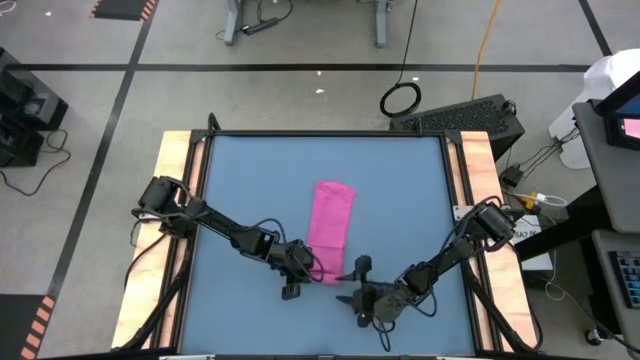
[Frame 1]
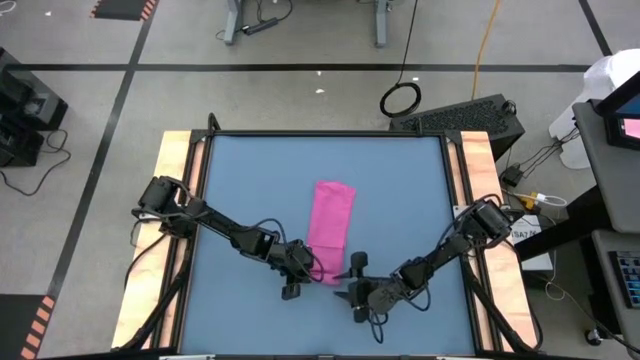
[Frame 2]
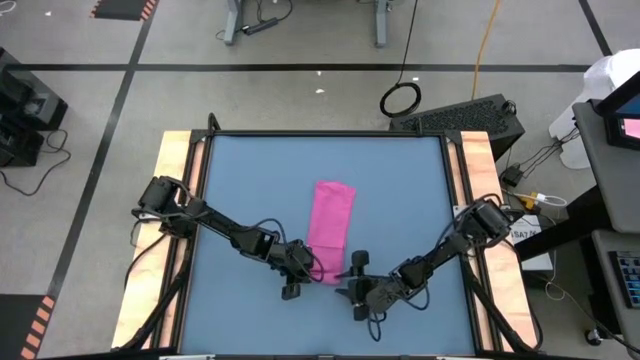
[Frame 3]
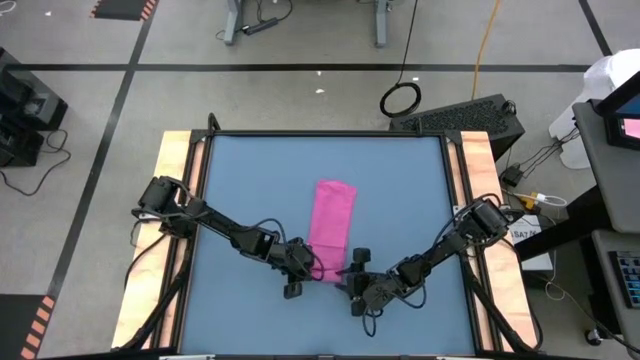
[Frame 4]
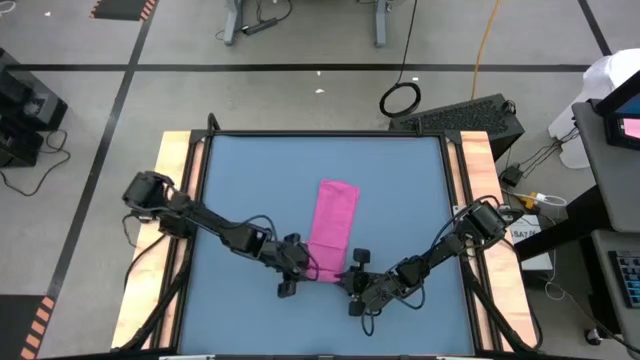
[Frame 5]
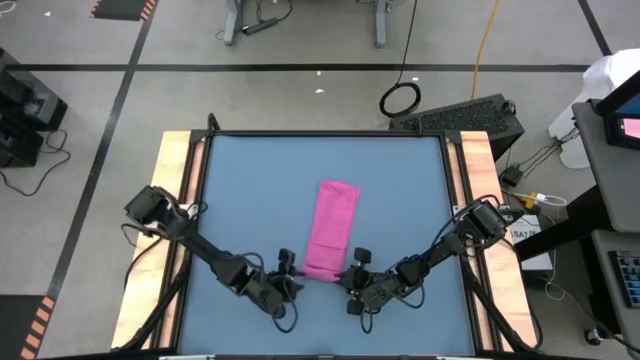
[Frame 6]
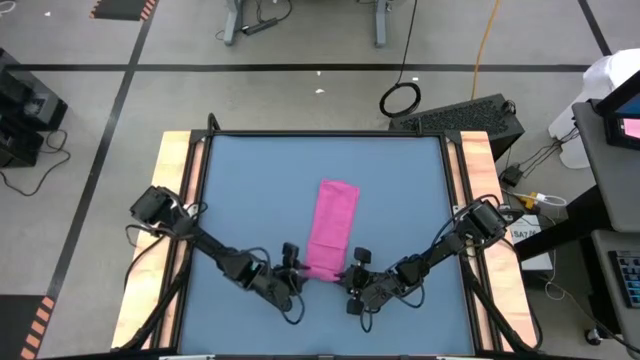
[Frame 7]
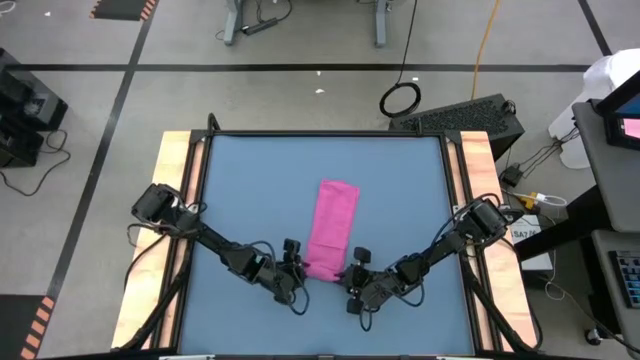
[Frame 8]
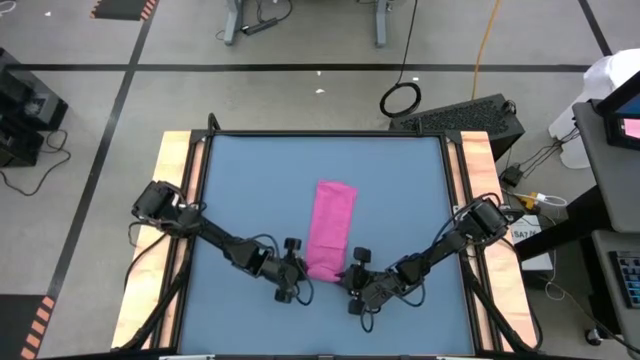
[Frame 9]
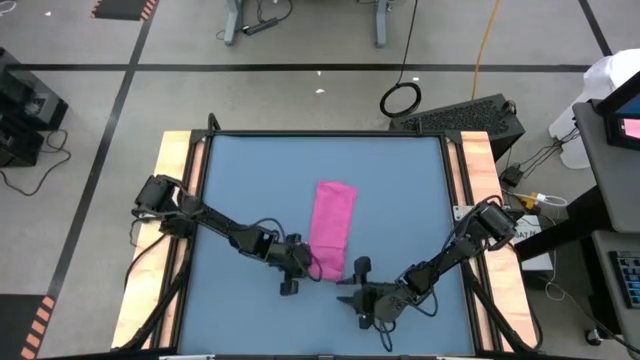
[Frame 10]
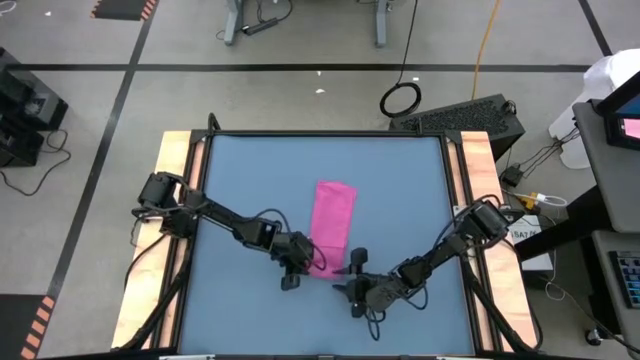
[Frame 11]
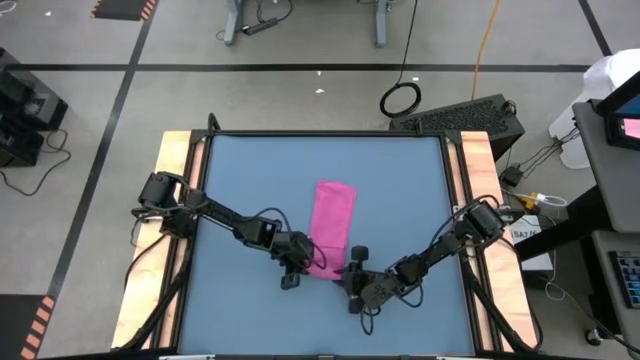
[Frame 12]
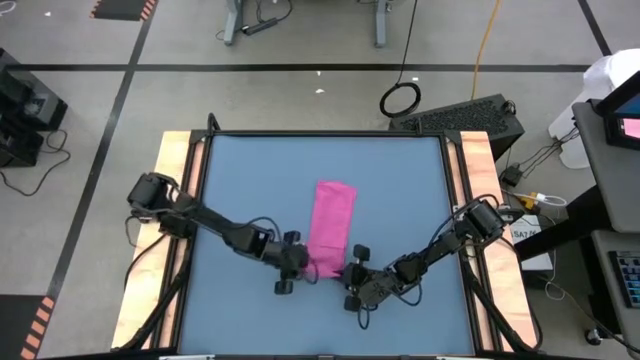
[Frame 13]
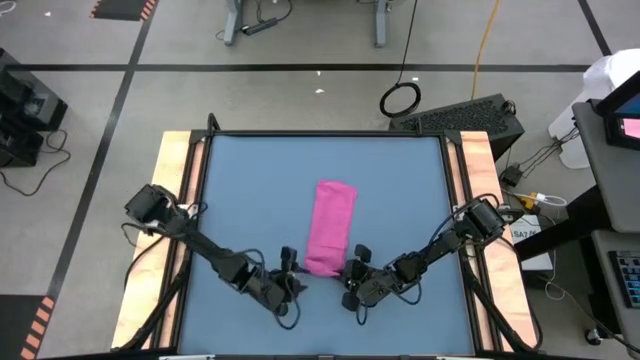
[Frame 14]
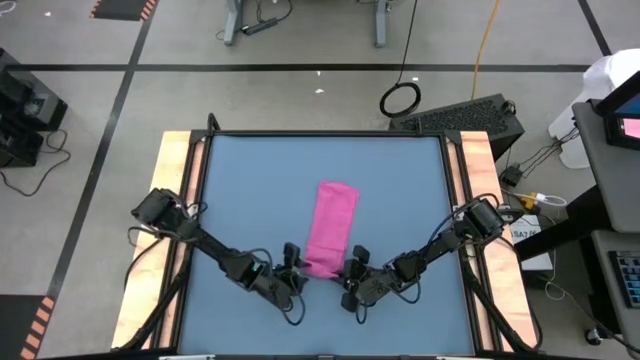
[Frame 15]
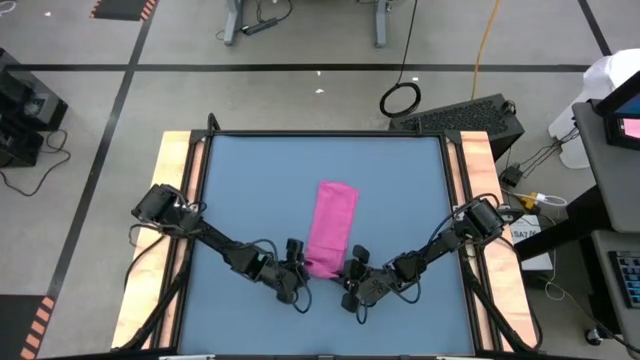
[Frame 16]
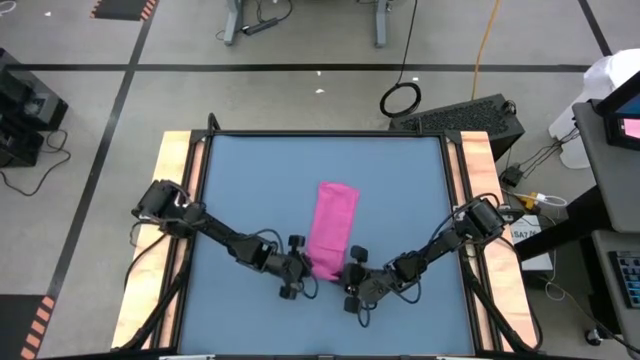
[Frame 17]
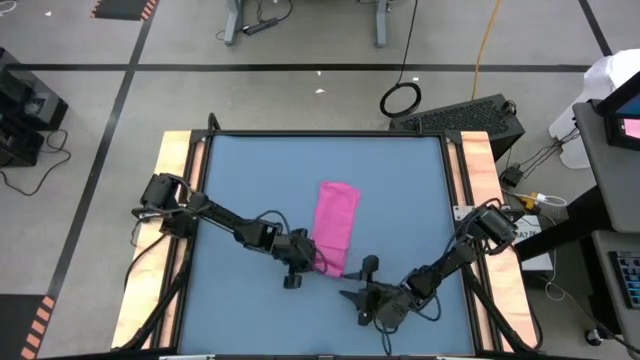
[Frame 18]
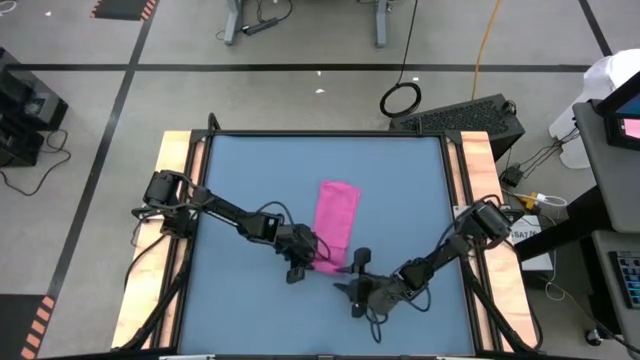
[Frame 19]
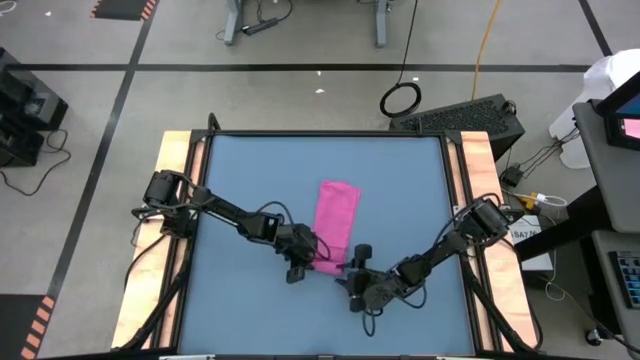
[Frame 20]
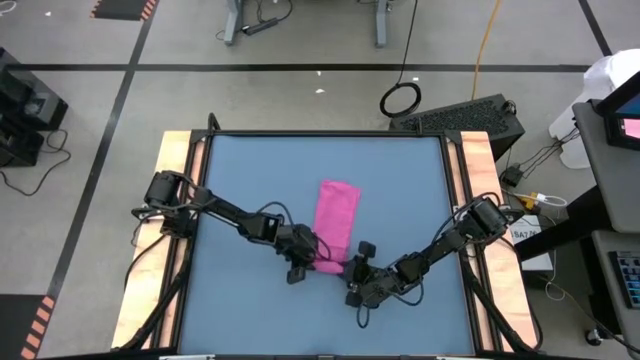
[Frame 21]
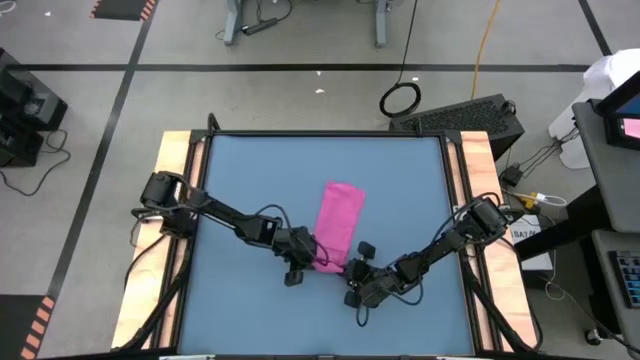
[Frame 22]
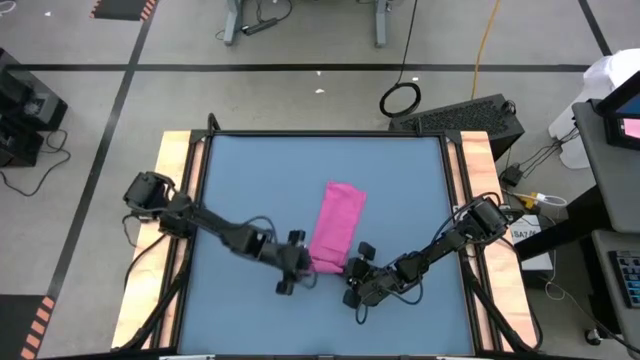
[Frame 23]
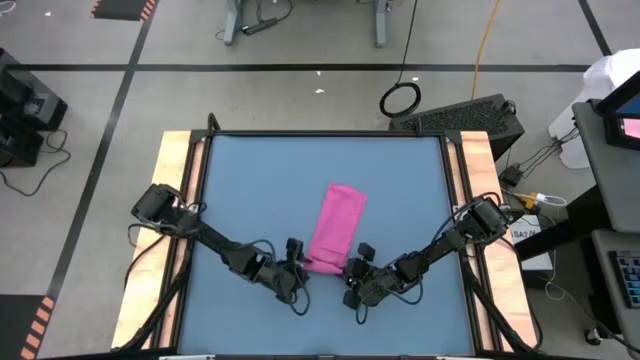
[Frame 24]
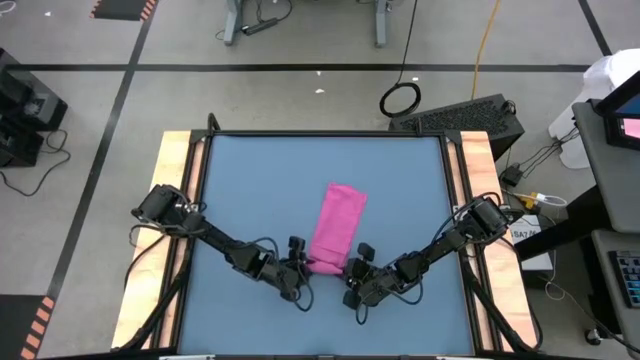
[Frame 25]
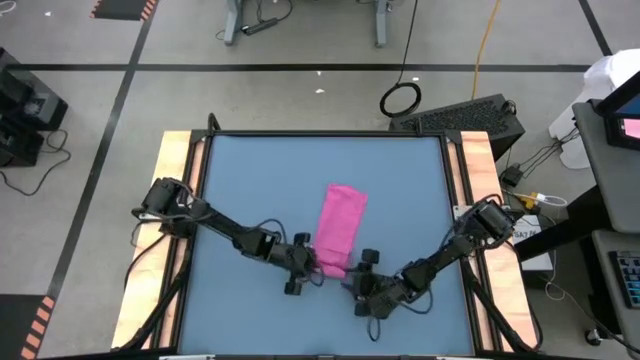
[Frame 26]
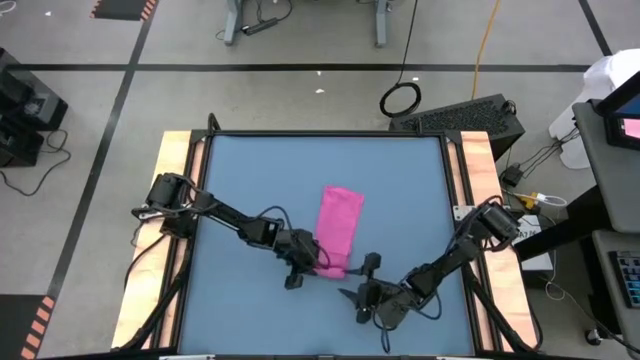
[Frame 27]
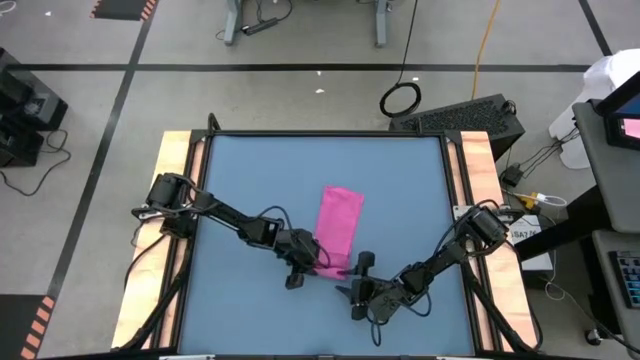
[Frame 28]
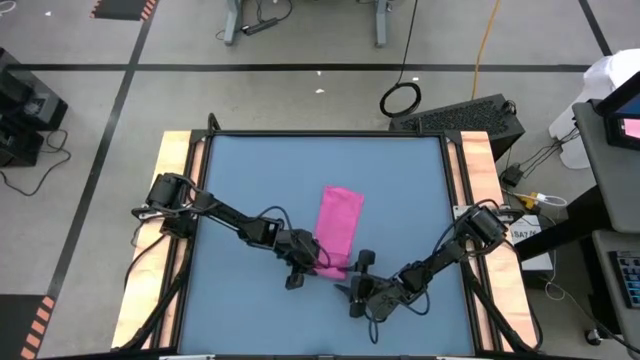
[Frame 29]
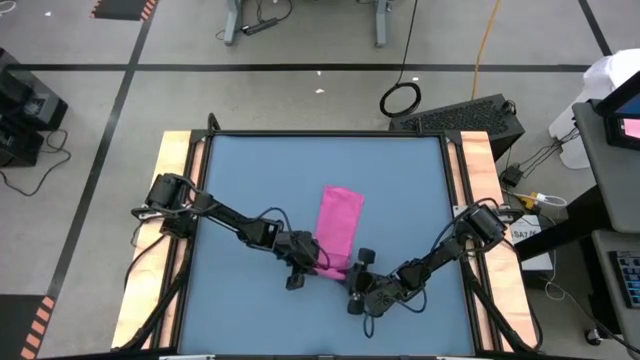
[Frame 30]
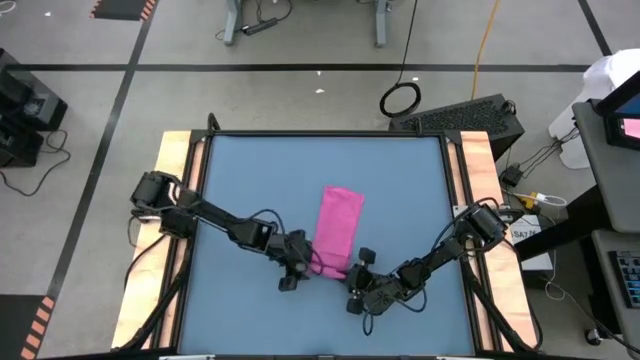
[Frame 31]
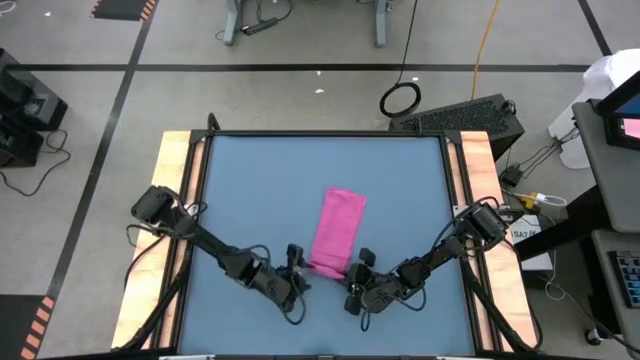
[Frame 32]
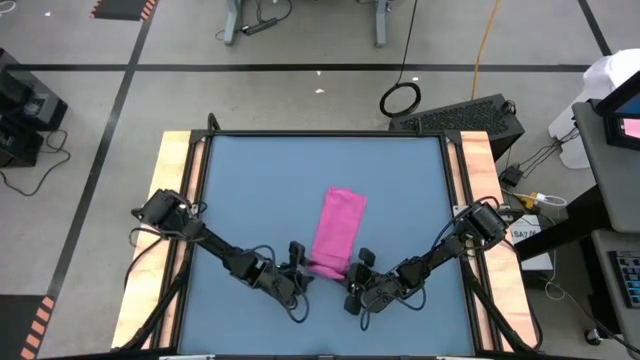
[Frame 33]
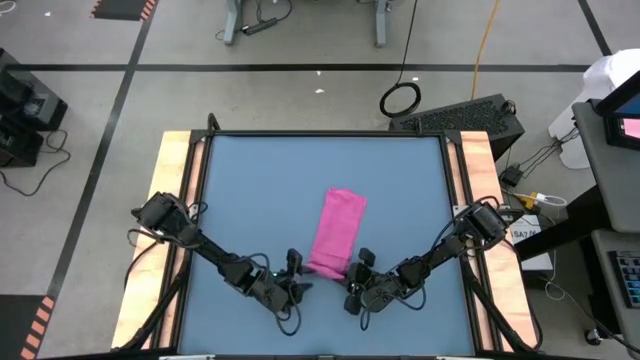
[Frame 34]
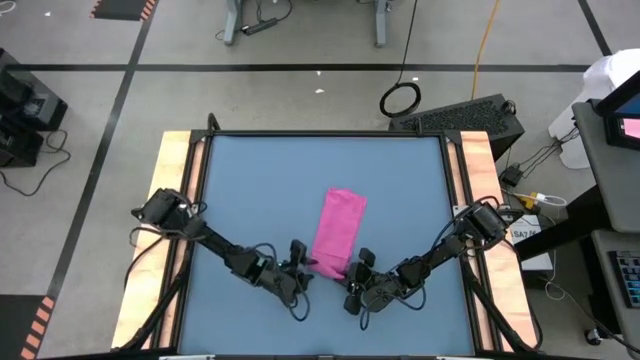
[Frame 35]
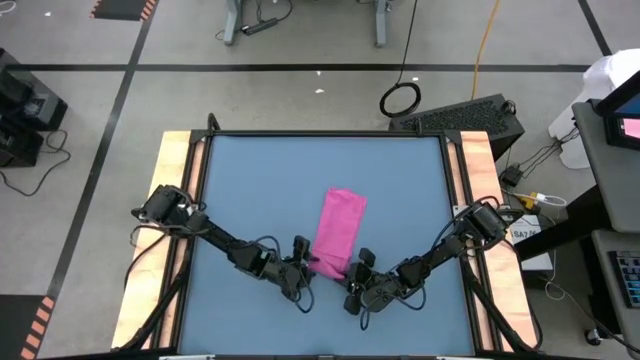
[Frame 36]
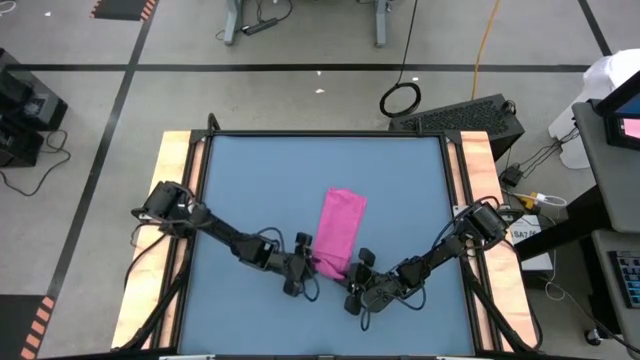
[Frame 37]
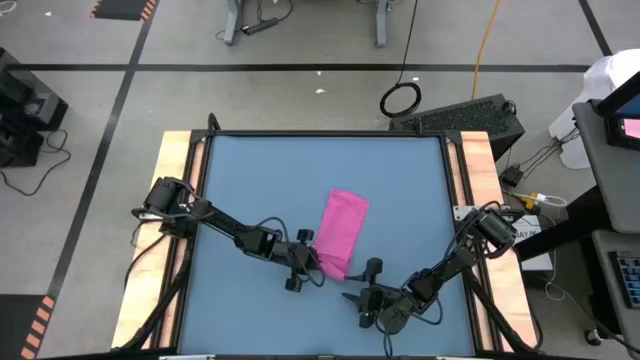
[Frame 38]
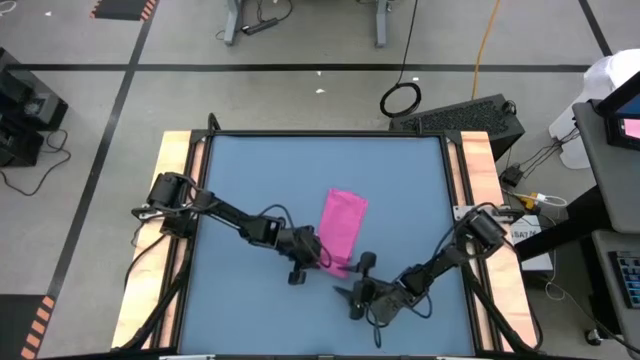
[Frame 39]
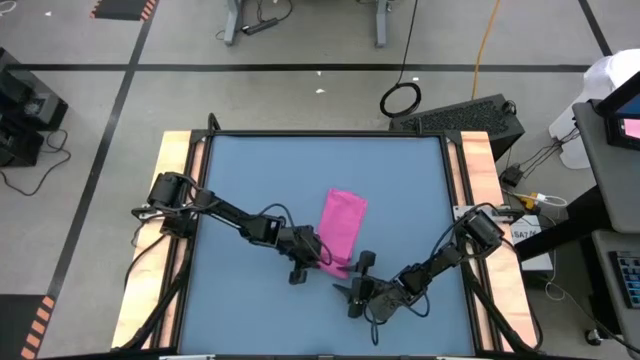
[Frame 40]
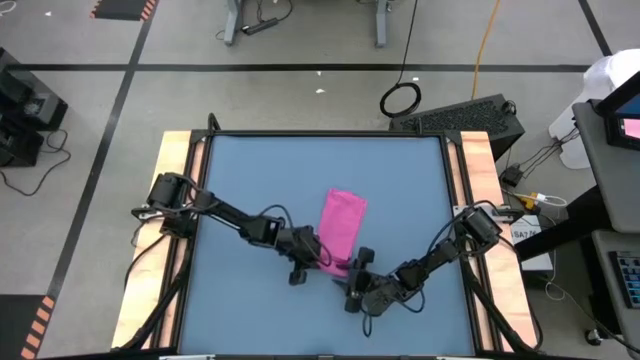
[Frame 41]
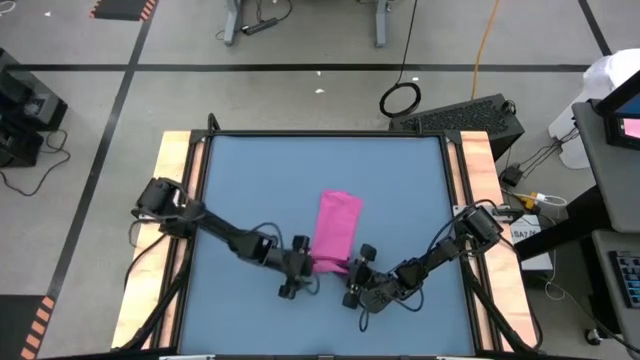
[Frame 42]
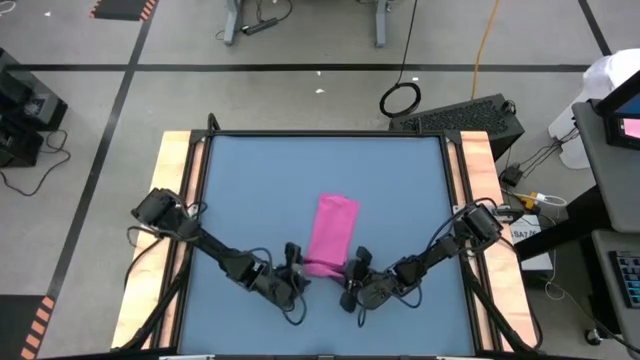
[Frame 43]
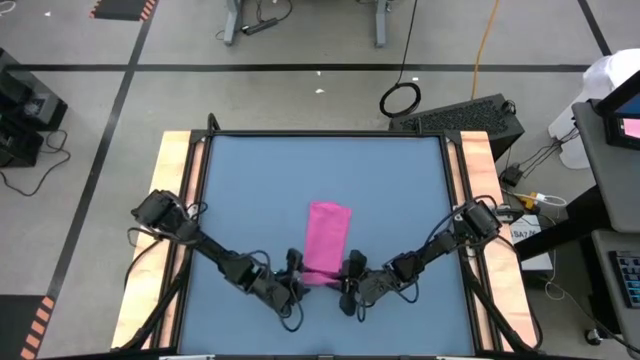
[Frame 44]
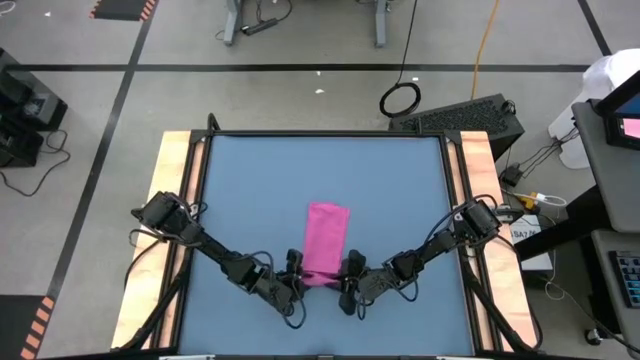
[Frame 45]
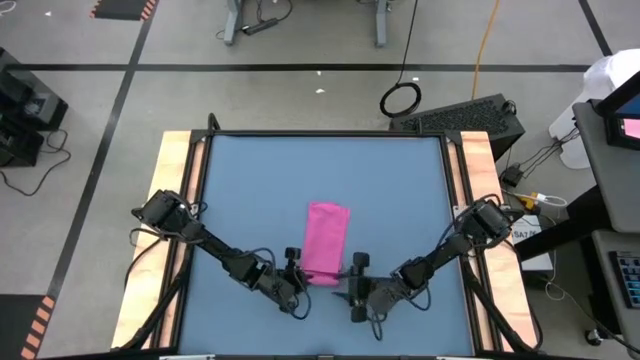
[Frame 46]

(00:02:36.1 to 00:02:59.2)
Task: Roll towel into tight, uniform cylinder
Roll the pink towel
